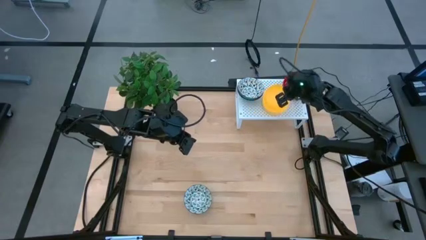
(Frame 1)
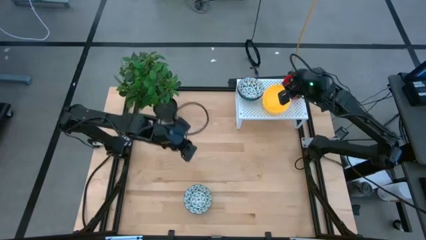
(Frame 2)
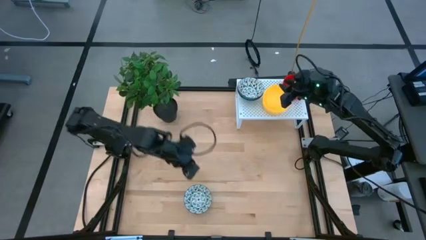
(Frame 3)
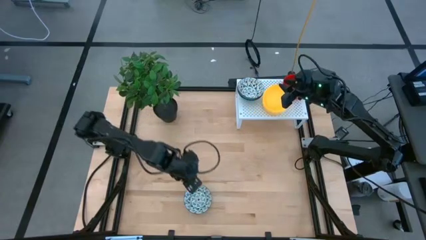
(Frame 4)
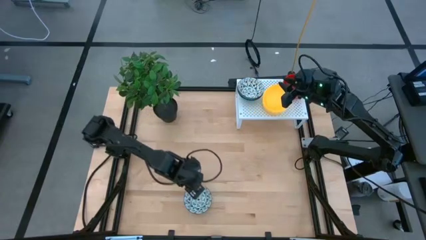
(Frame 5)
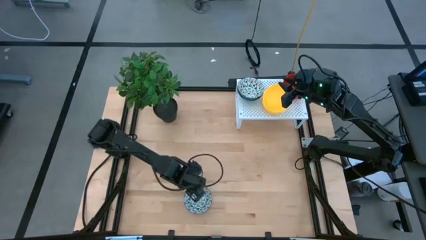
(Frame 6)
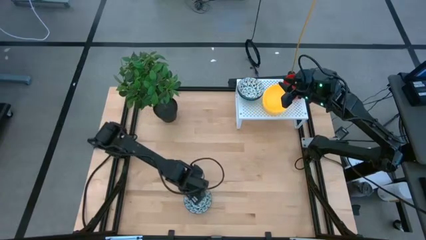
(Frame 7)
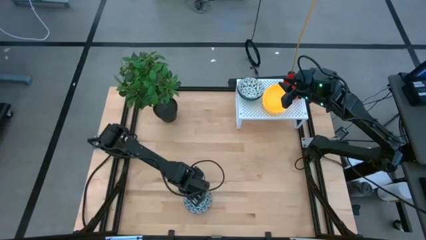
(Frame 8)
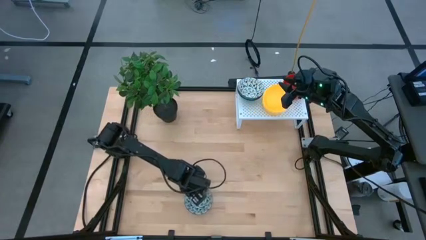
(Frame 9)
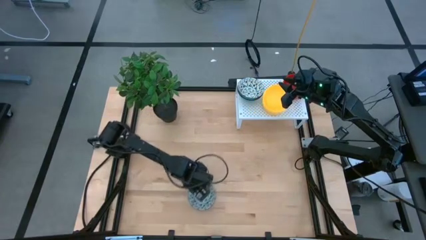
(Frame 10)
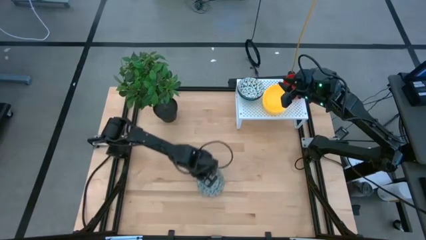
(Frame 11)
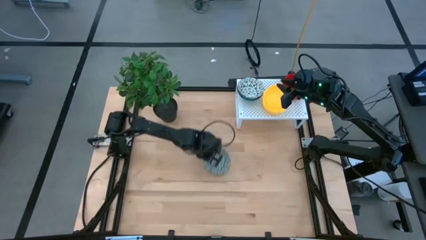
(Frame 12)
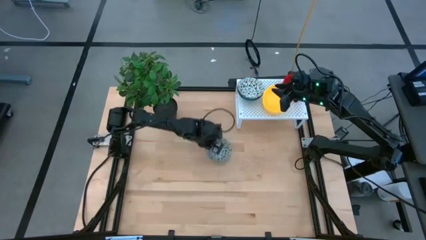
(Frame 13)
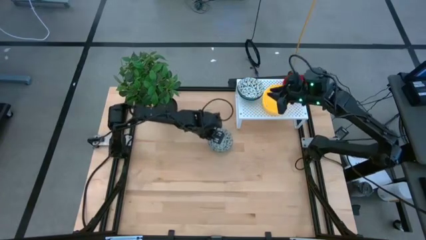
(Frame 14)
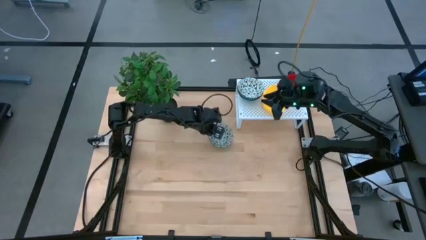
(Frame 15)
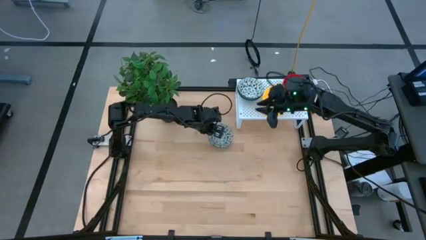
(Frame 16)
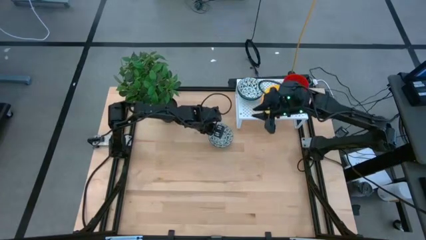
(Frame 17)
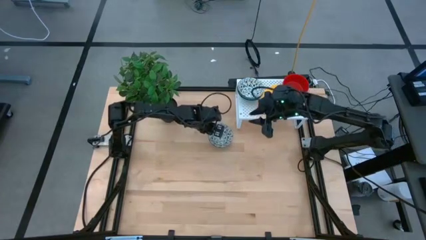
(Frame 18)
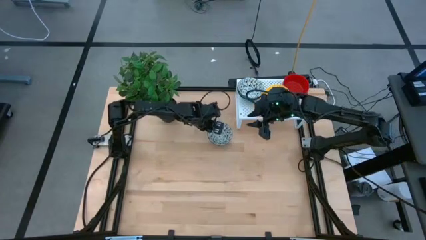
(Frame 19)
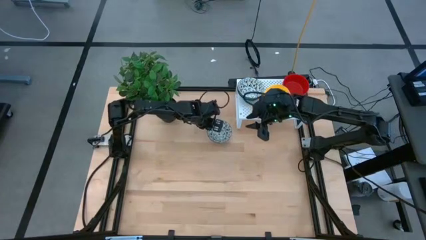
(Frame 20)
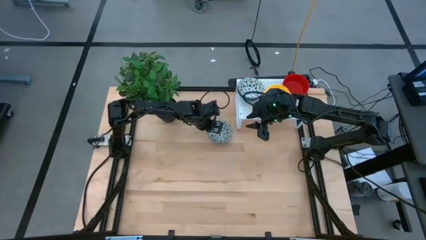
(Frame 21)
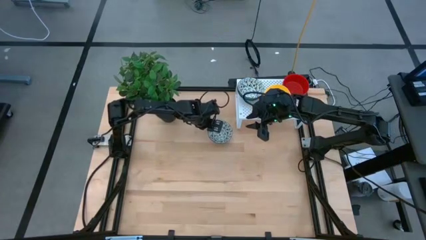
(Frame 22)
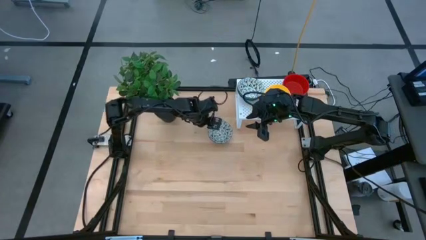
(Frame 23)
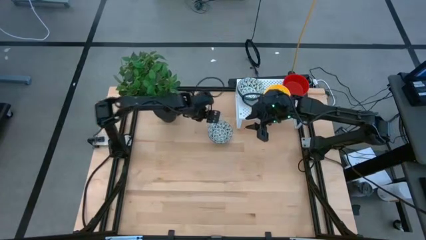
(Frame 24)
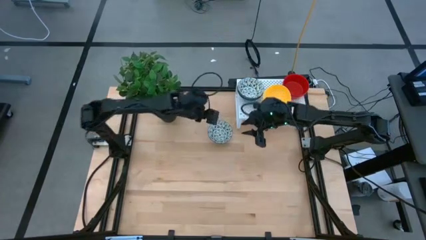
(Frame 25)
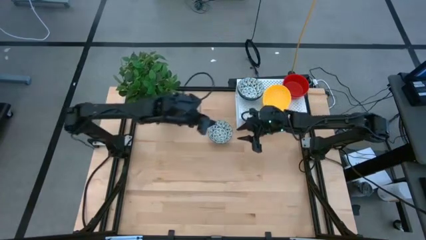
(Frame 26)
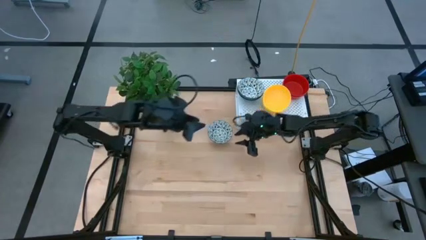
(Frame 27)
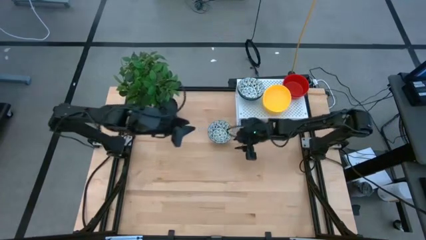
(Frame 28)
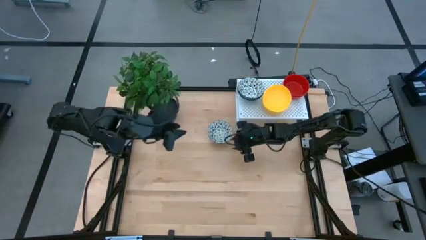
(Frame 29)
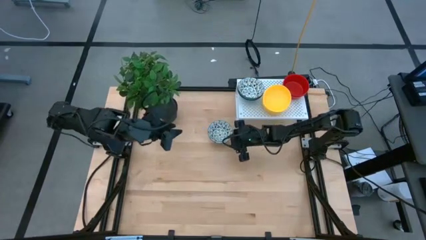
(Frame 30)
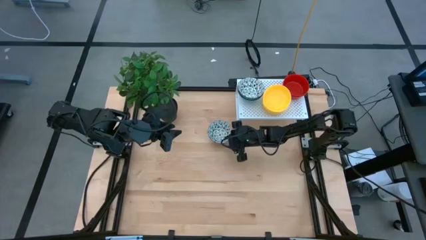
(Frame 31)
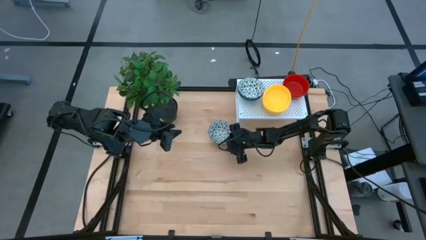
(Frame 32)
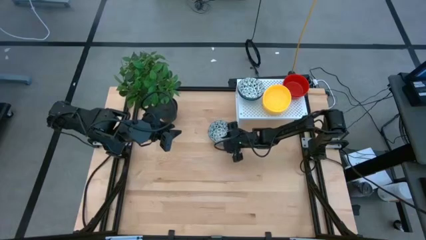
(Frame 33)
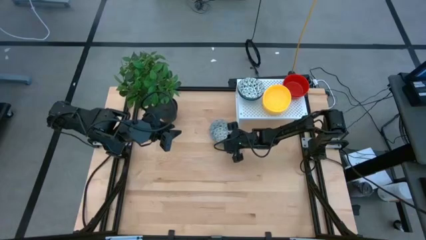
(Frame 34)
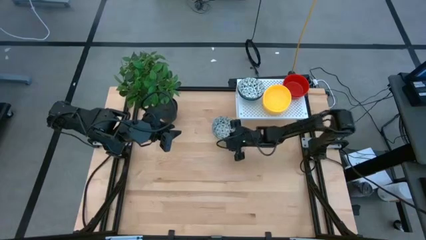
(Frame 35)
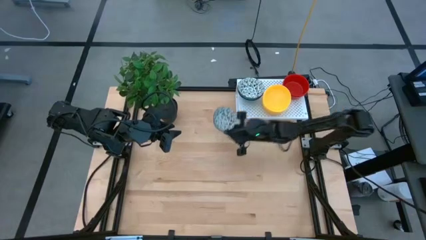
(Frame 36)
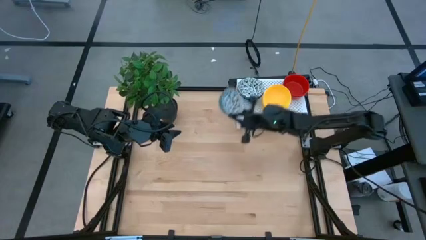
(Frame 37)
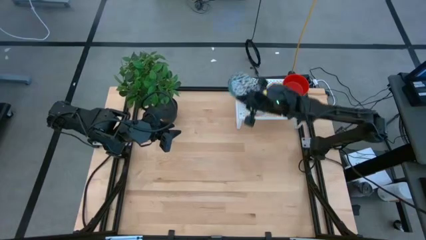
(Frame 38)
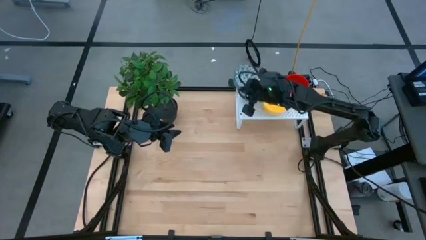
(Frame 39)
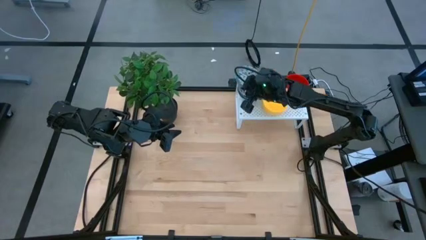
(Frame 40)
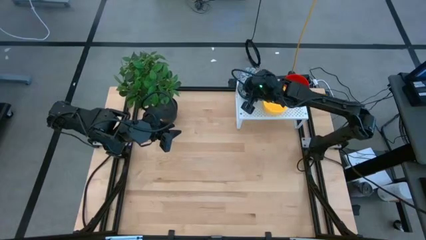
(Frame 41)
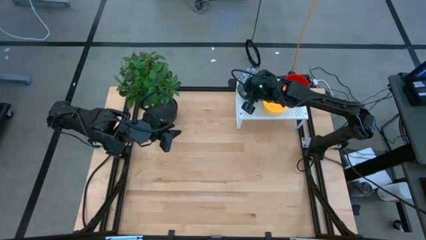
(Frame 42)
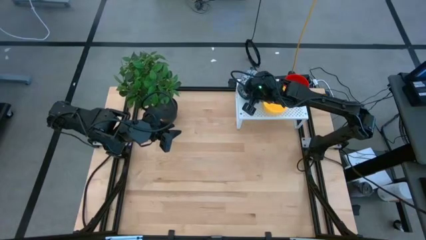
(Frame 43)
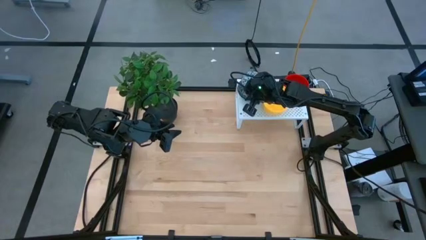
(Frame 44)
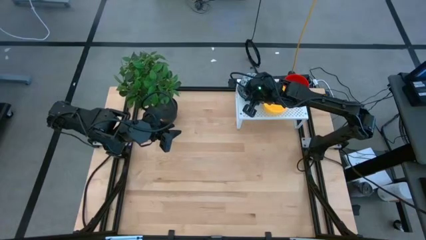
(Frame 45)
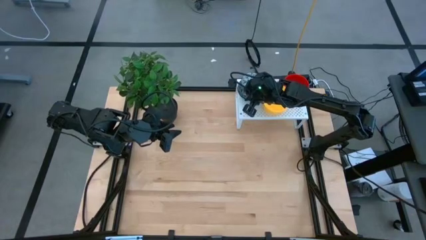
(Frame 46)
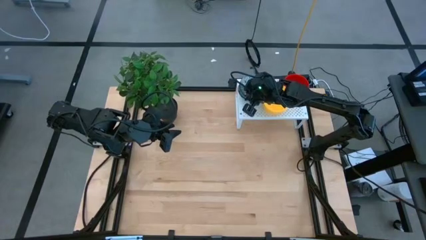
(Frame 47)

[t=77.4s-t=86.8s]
Task: Pick & Place Mini bowls
Stack the blue bowl on the blue bowl on the shelf

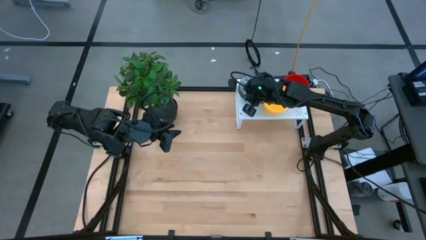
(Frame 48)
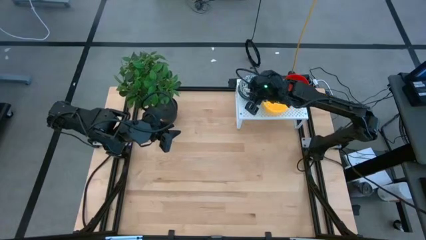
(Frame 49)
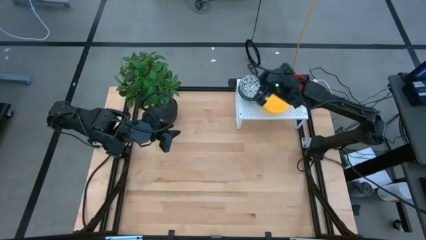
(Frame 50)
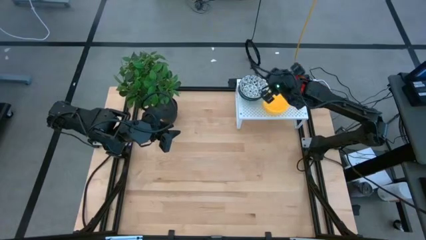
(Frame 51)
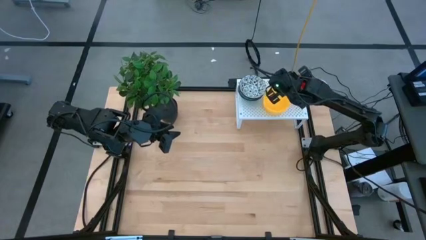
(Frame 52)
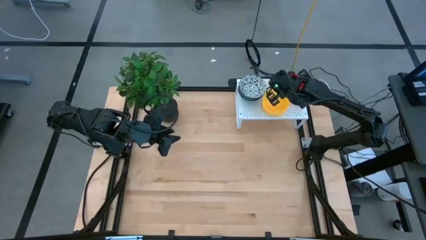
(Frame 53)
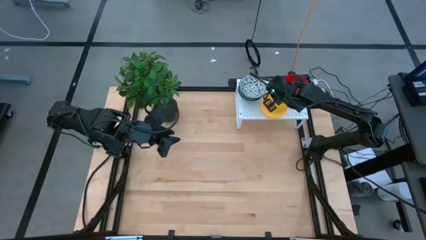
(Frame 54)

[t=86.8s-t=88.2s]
Adjust the yellow bowls on the shelf

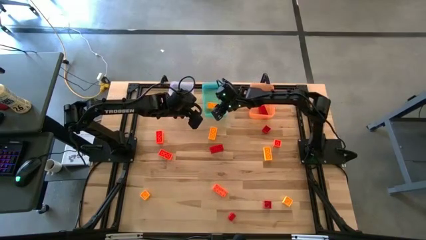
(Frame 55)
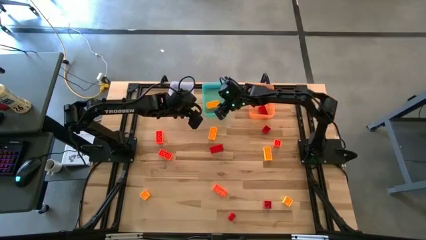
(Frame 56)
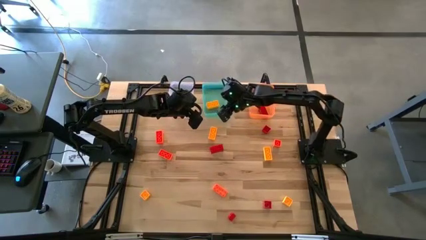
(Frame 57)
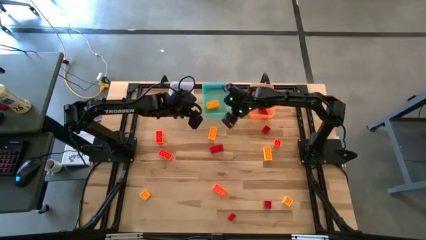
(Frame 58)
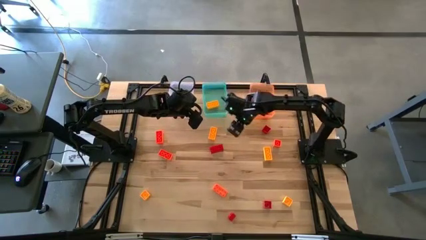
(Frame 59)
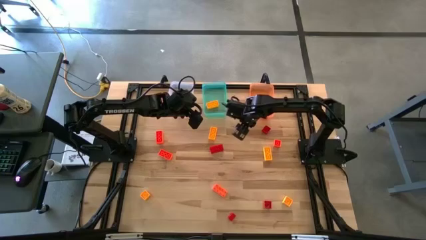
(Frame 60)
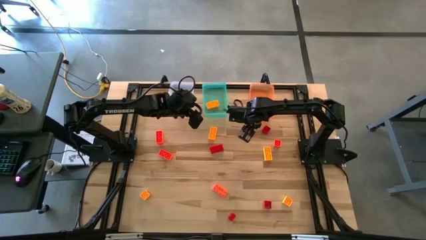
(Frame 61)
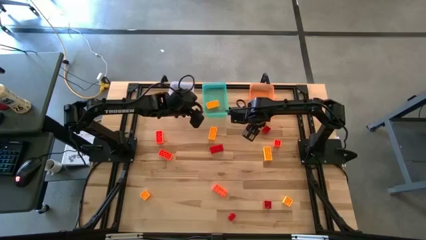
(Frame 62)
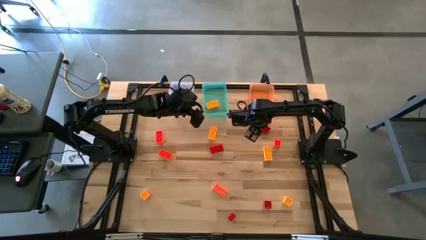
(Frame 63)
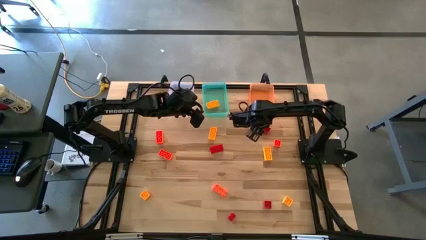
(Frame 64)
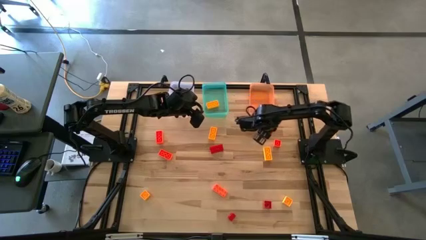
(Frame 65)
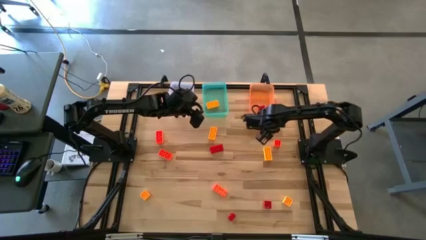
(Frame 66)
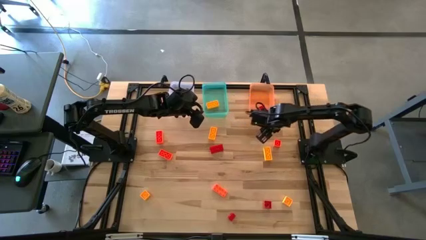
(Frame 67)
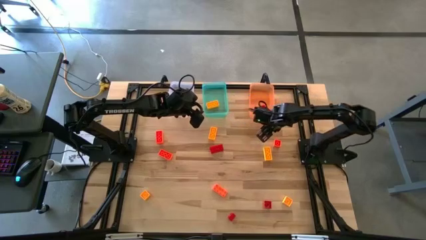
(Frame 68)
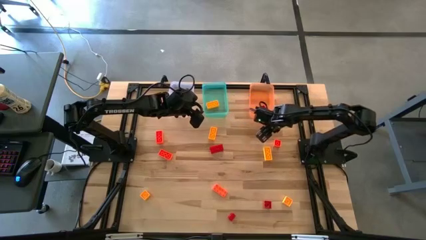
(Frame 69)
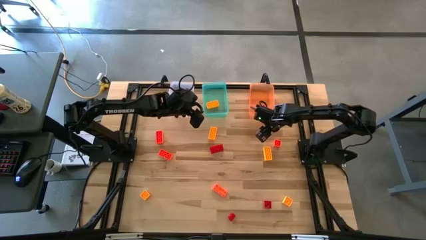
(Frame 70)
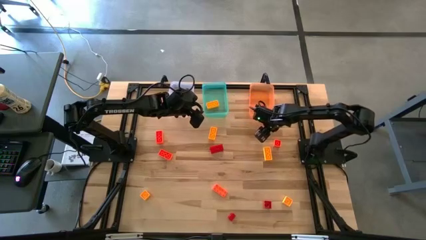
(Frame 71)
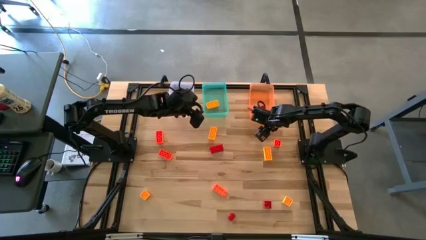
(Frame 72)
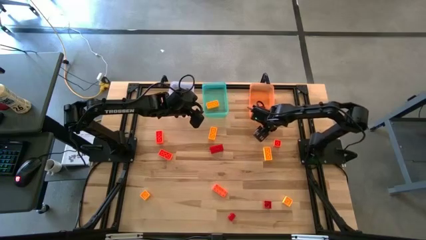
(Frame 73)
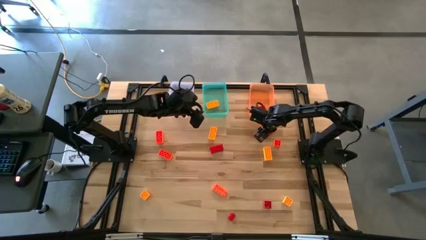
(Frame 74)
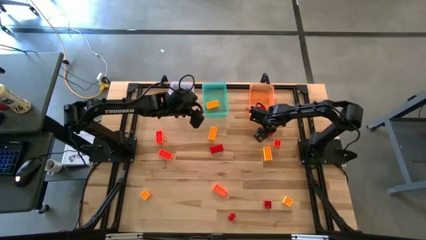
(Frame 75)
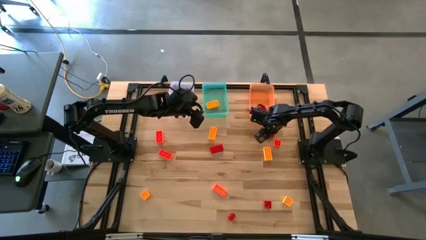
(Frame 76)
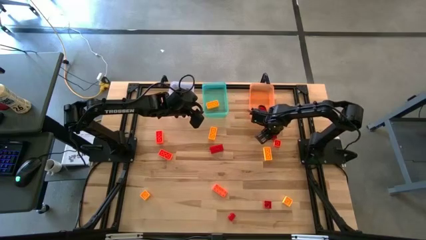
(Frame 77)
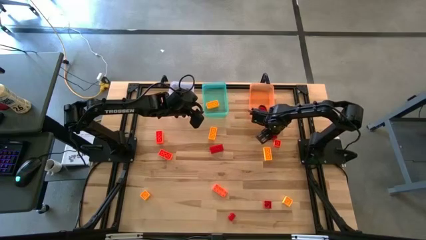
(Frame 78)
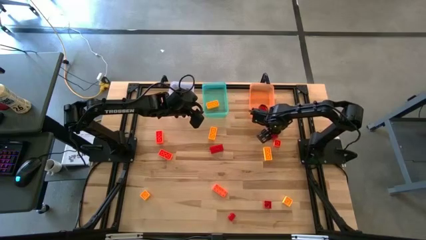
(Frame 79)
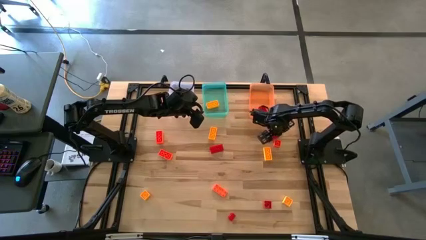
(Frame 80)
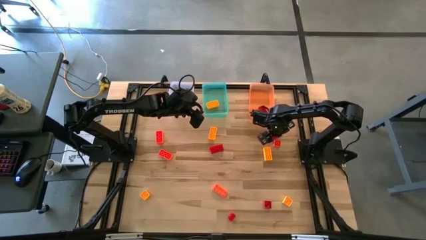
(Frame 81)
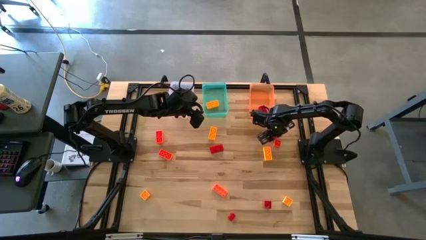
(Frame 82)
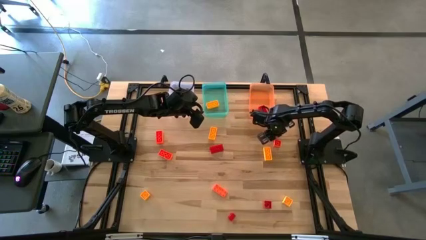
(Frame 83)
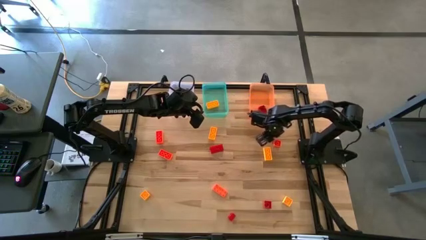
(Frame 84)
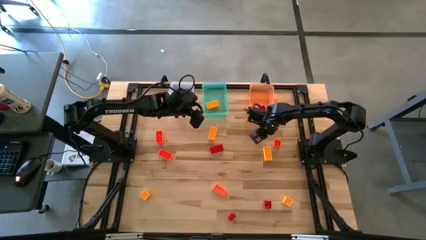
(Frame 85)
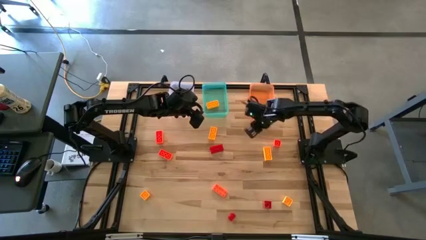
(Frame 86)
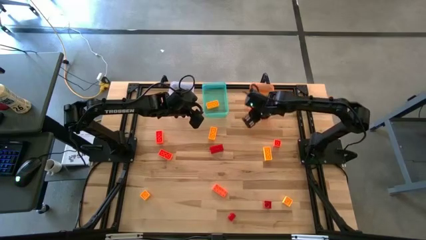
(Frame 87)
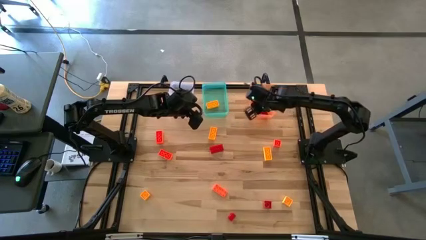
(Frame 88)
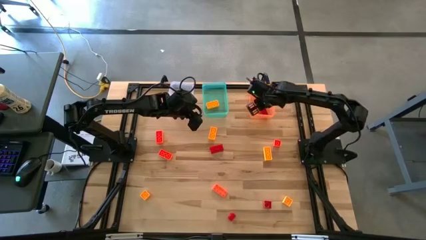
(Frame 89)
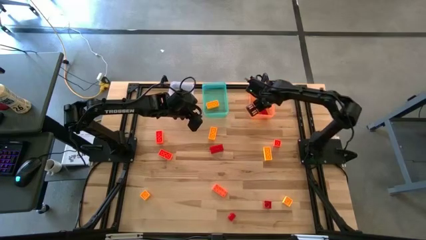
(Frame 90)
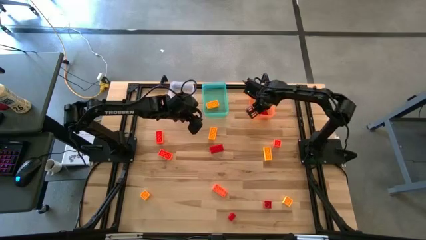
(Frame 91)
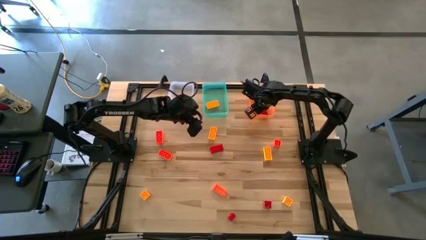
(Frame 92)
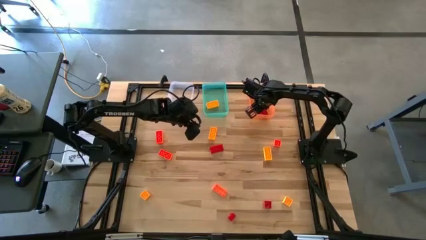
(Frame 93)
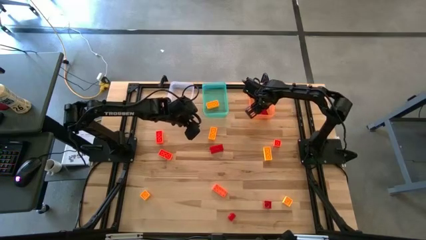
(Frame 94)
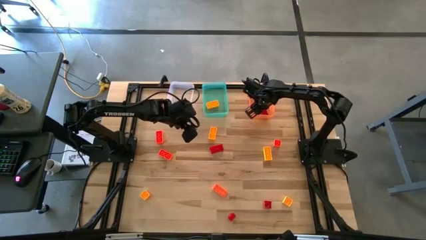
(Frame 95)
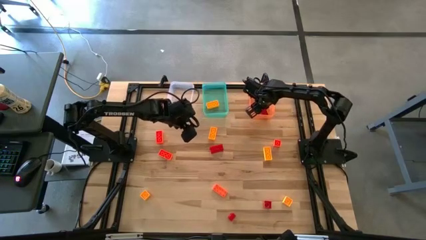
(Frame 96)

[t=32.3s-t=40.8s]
Task: Sort & place blocks by color
Put the red game piece into the orange bin
